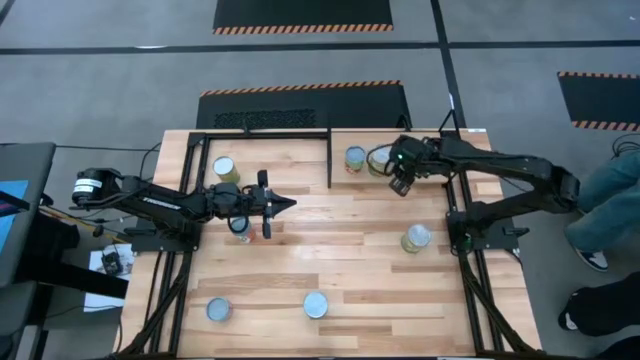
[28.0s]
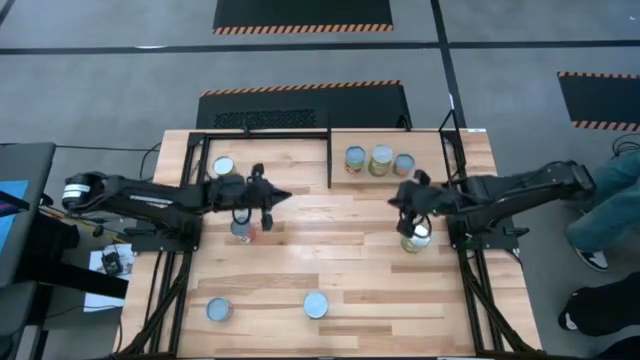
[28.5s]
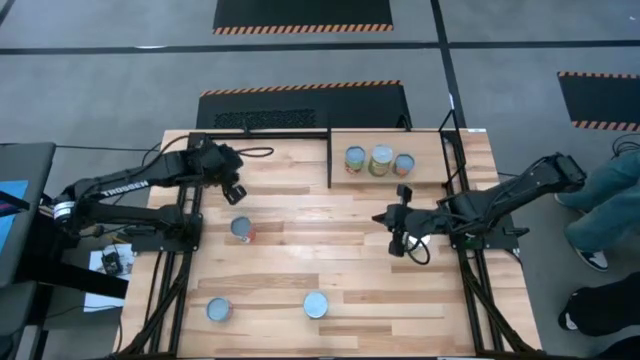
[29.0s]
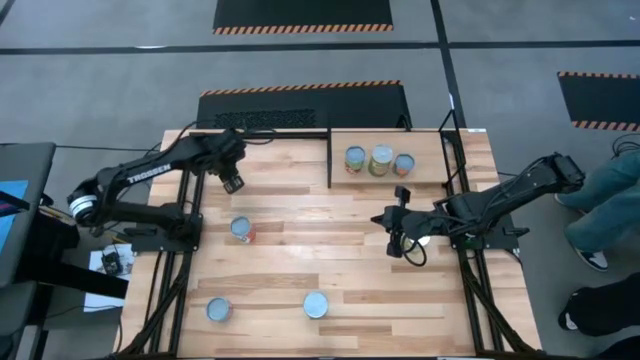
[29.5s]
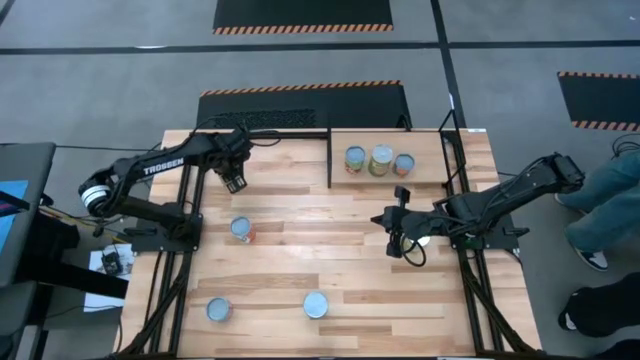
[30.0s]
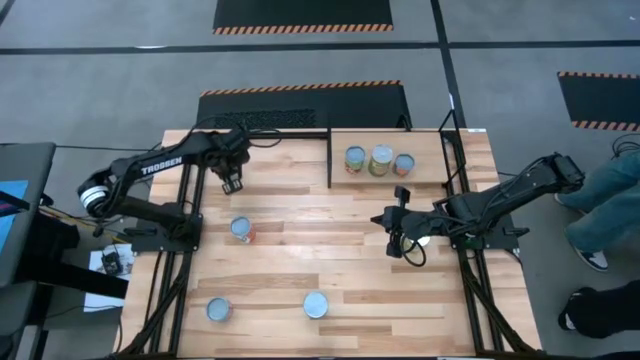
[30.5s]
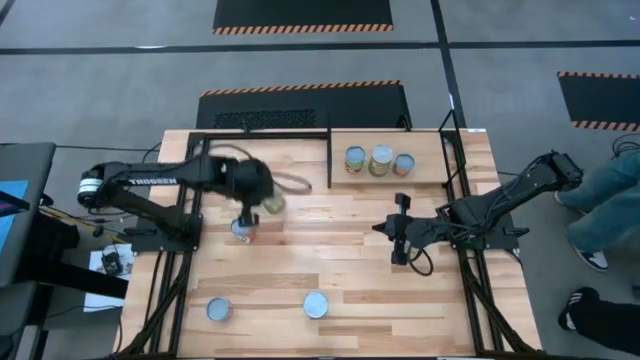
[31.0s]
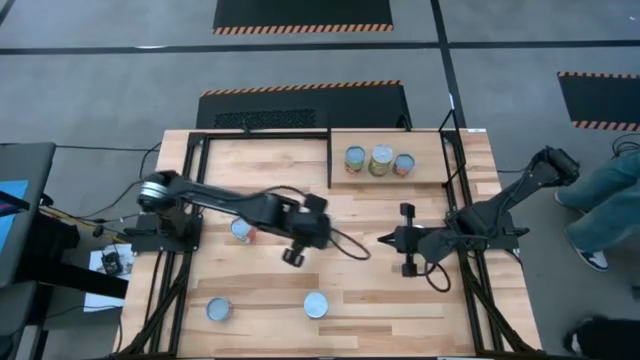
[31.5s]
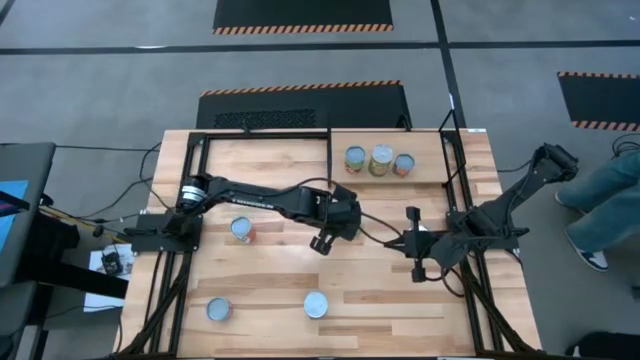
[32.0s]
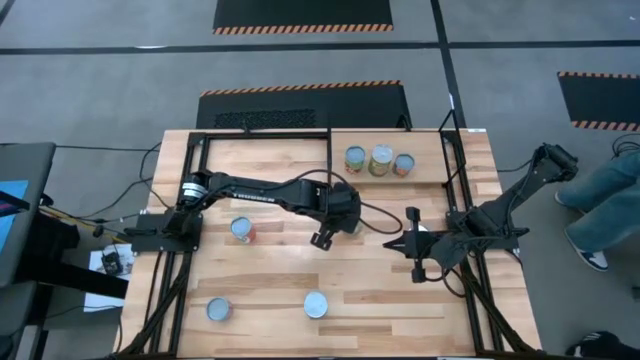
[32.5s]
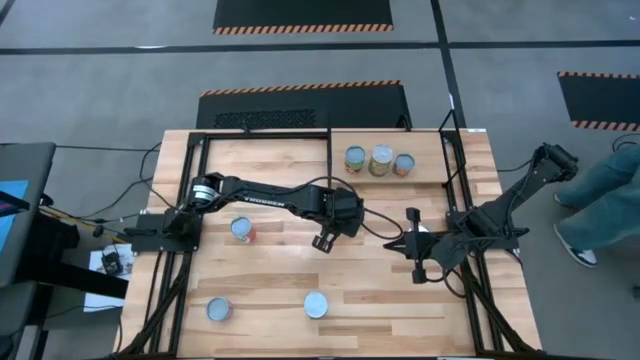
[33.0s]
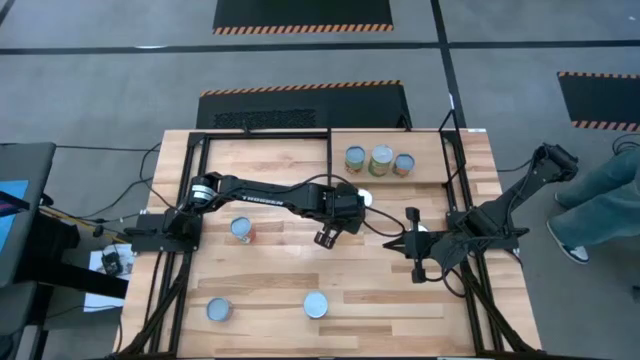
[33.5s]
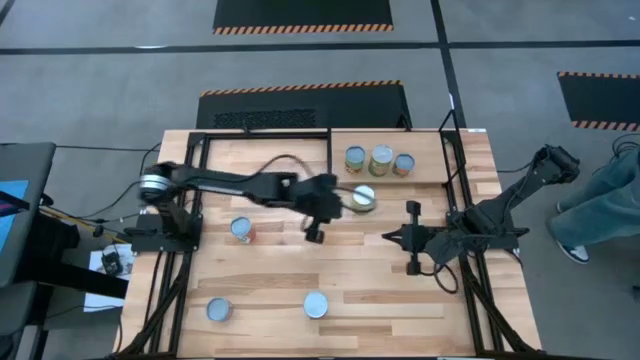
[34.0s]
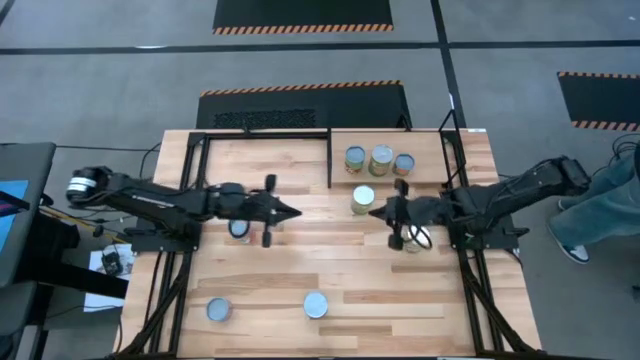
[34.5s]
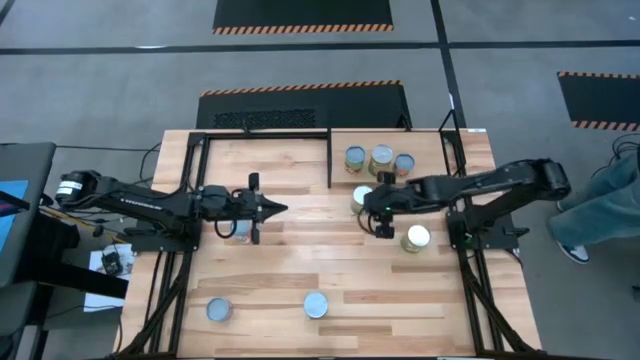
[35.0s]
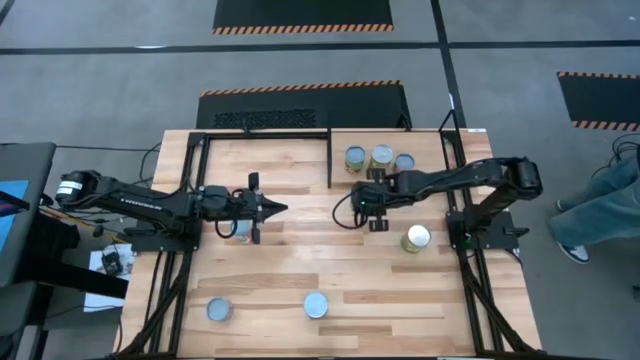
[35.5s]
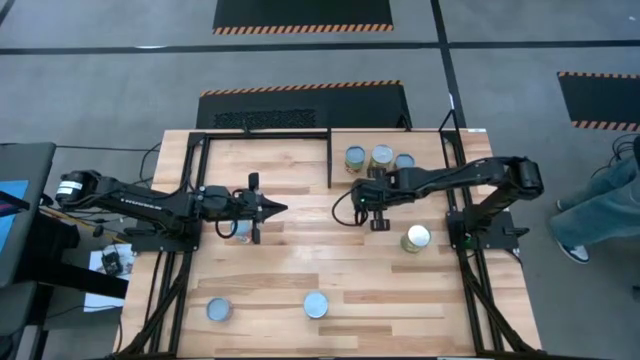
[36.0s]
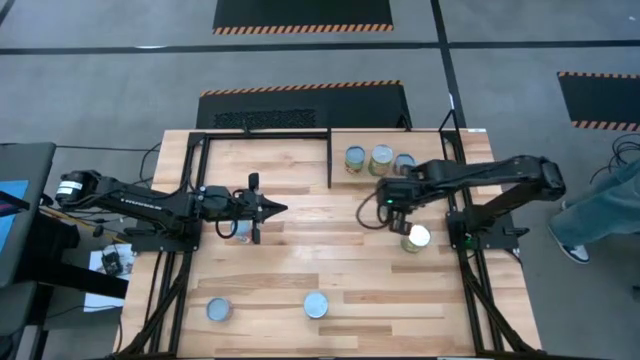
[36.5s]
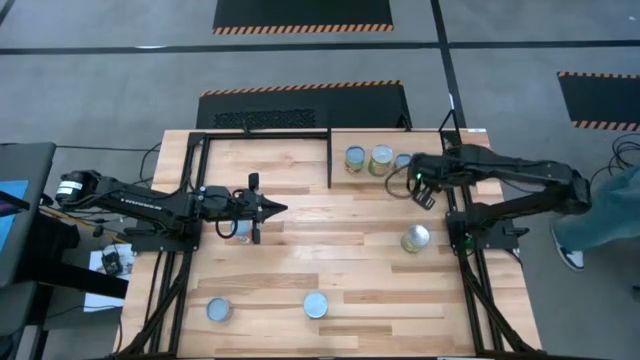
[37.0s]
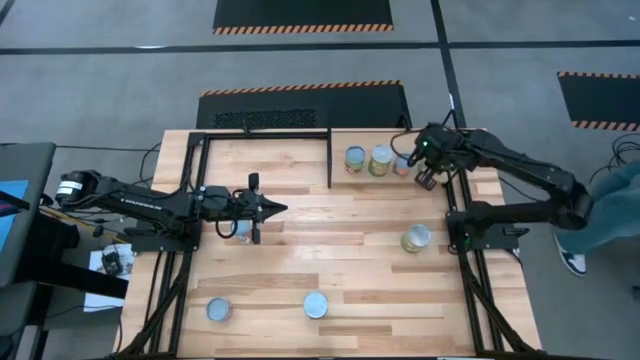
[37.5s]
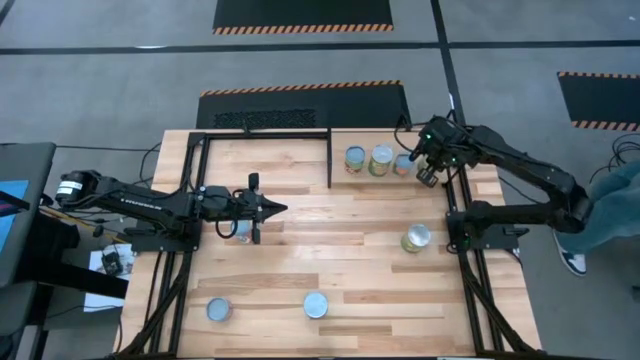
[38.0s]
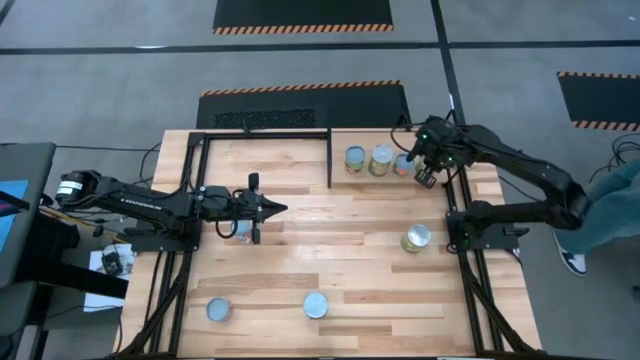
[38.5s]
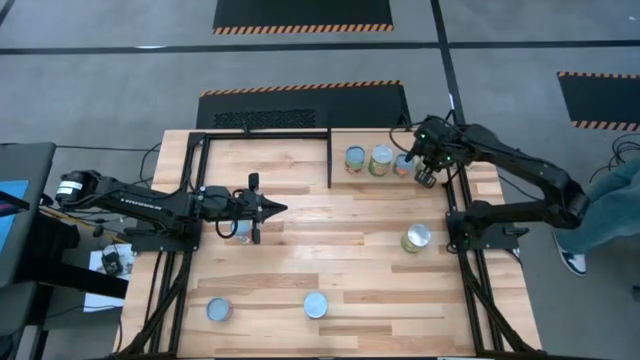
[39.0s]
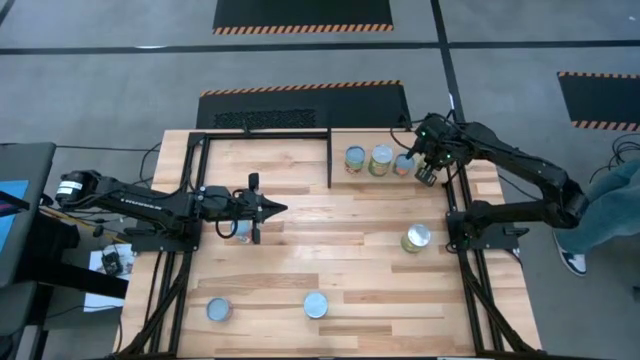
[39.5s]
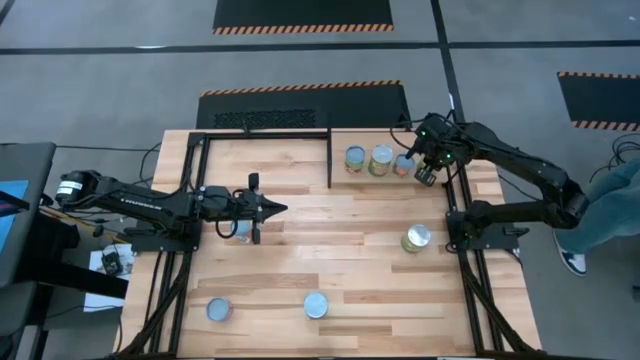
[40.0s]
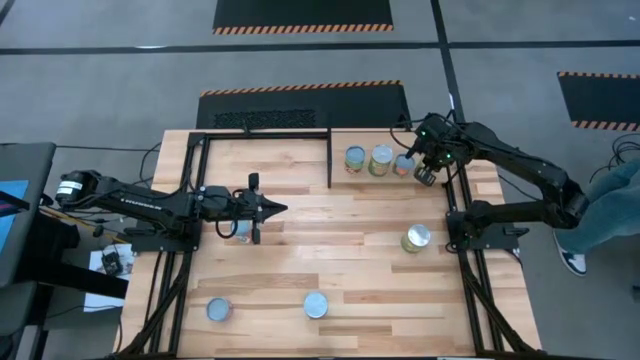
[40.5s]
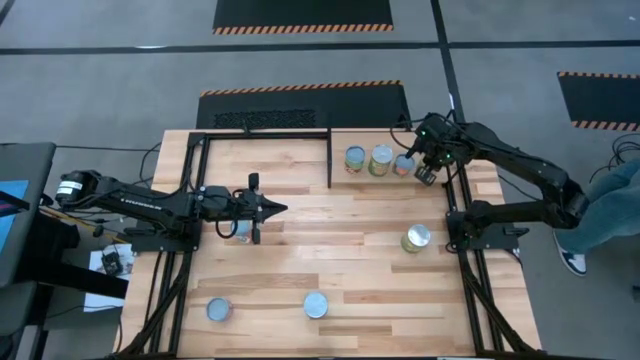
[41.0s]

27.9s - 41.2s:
Task: Pick and place cans onto a shelf
Put the left canned pears on the shelf

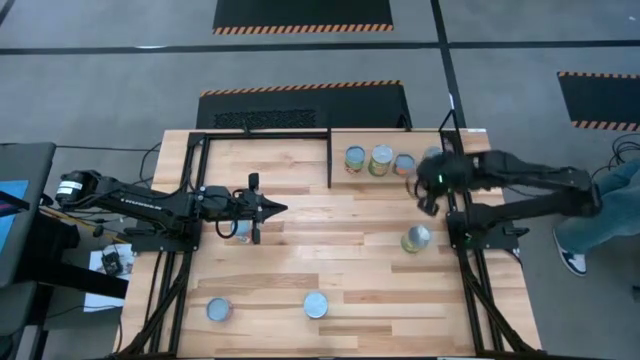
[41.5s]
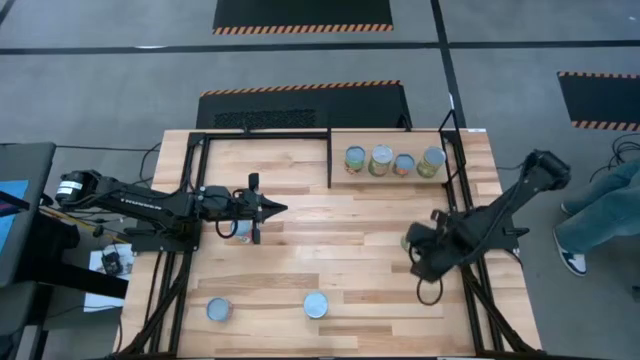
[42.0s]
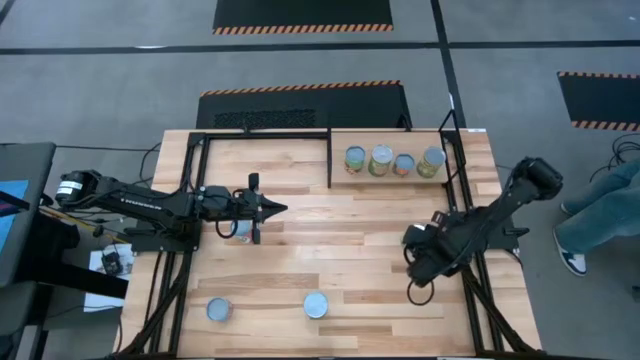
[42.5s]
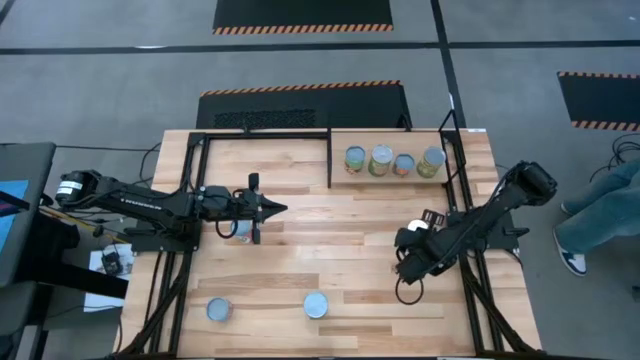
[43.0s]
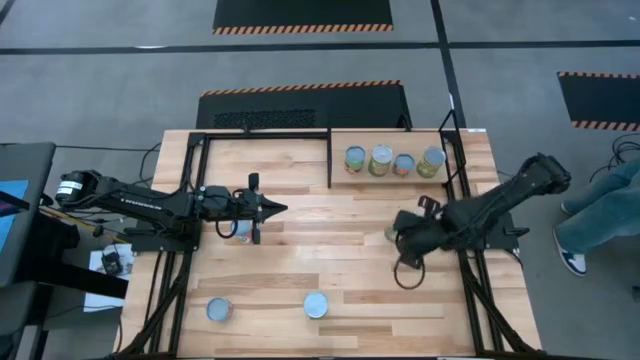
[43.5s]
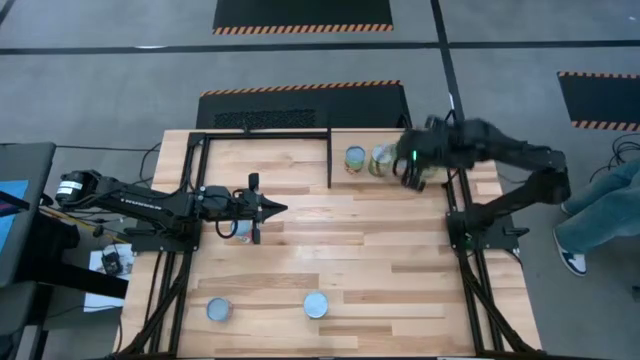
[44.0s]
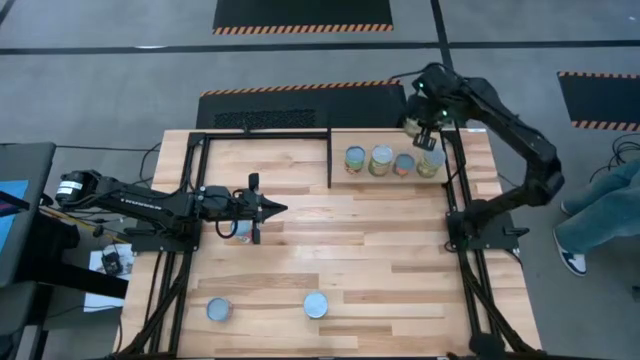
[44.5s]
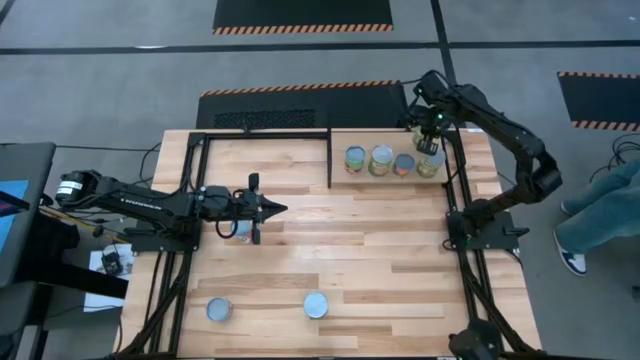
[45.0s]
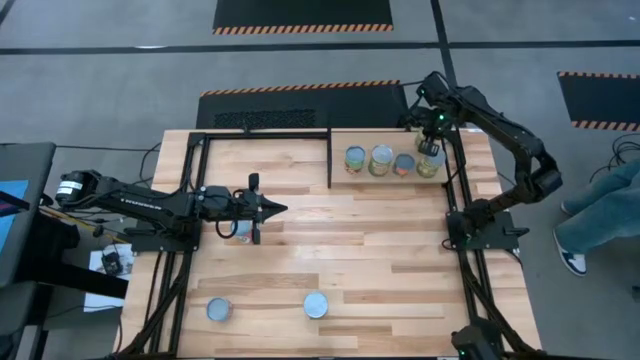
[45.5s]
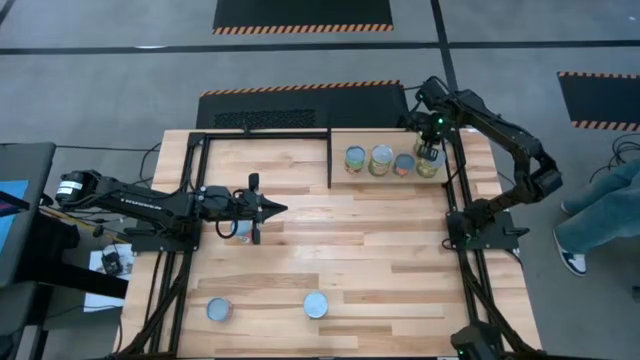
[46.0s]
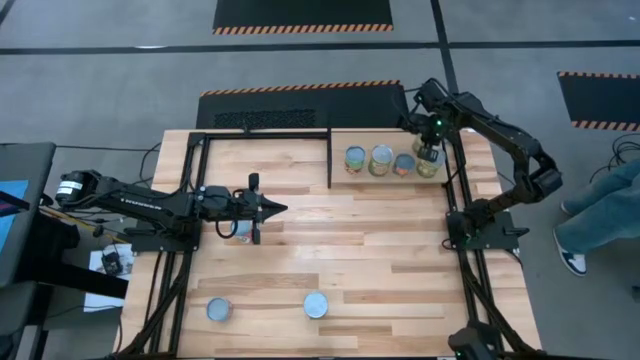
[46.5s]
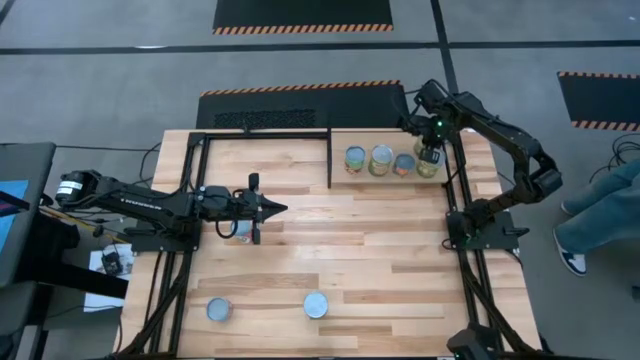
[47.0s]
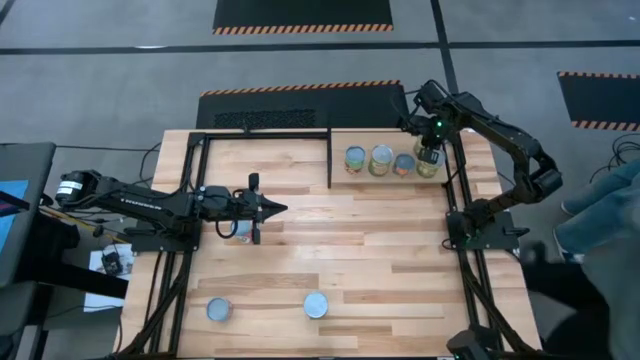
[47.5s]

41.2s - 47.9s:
Put the canned pears on the shelf

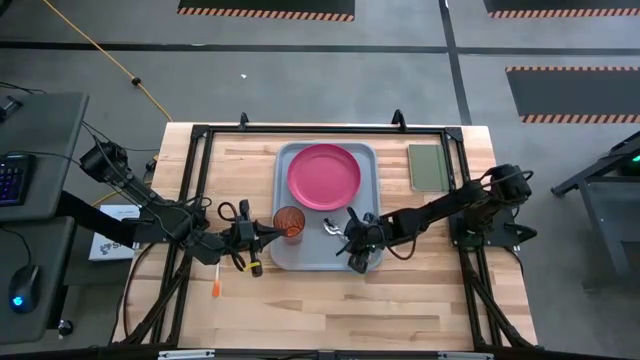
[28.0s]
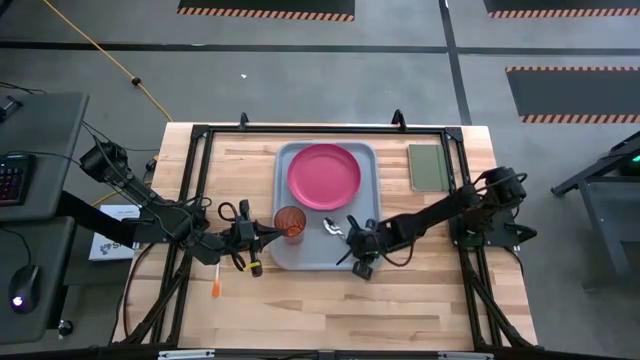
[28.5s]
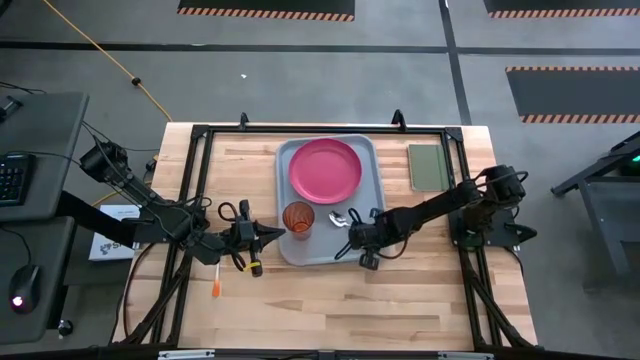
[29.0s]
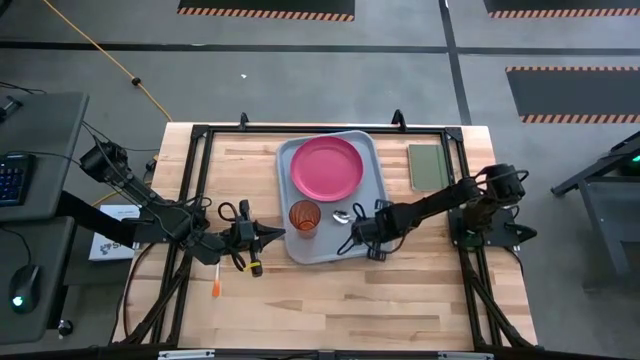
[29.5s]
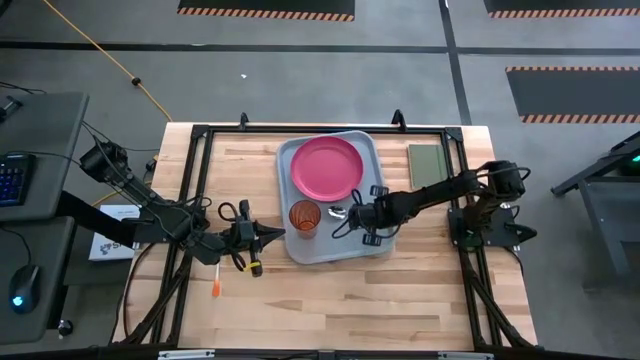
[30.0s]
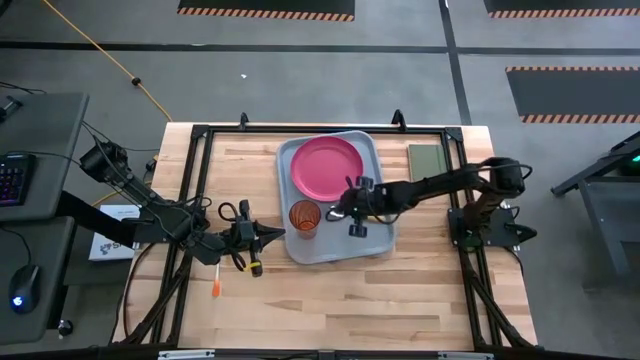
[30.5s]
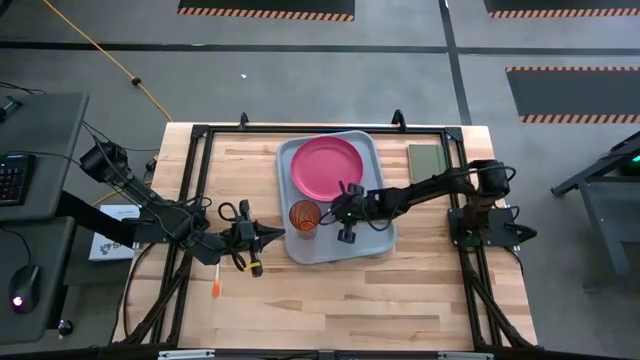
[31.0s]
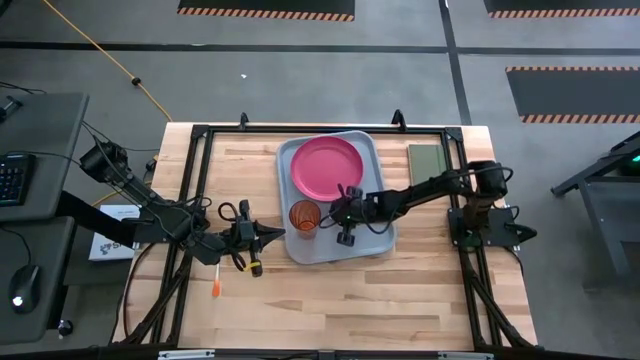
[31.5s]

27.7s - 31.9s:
Task: Pick and place plate/cup/fork/spoon on tray
Put the yellow spoon on the gray serving tray to the right of the orange cup
